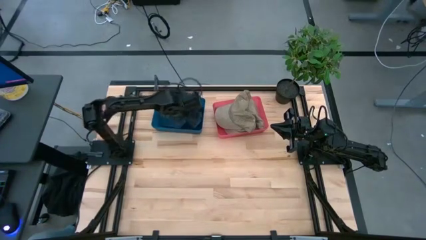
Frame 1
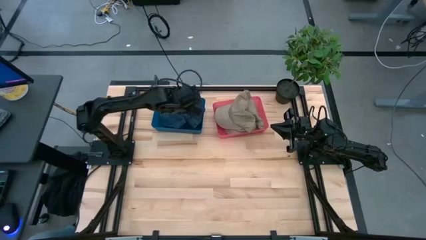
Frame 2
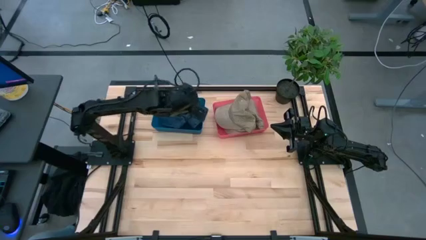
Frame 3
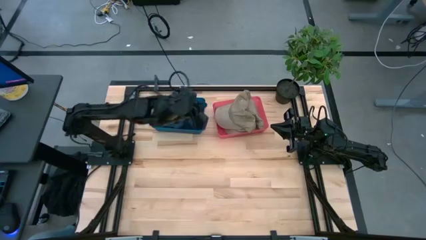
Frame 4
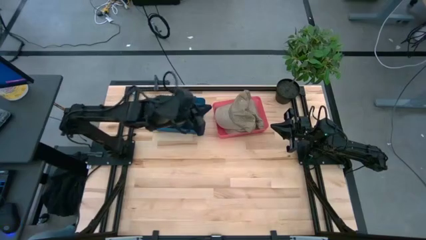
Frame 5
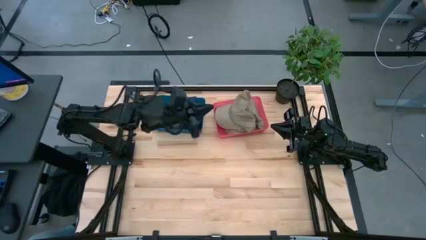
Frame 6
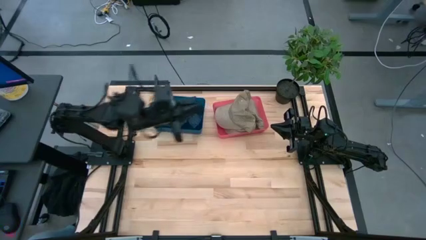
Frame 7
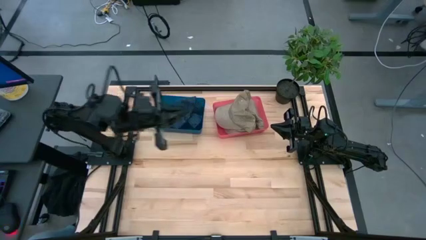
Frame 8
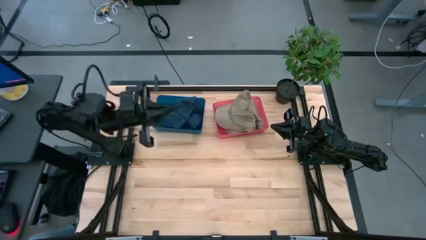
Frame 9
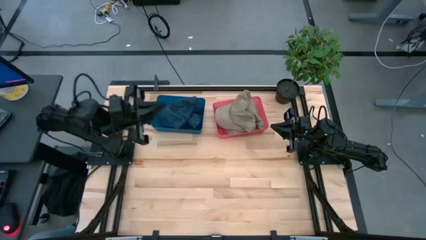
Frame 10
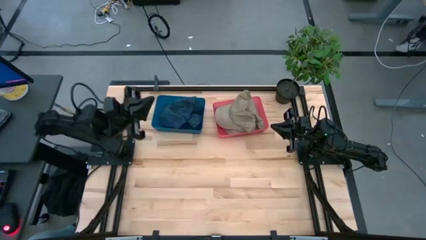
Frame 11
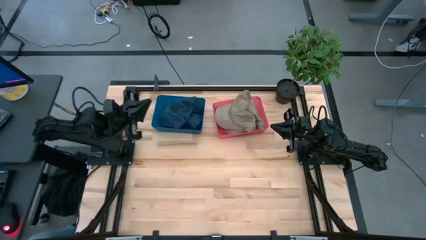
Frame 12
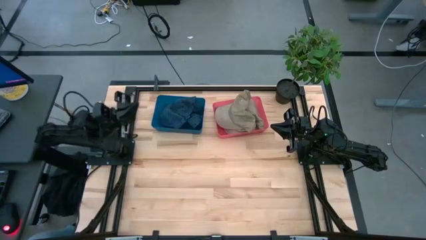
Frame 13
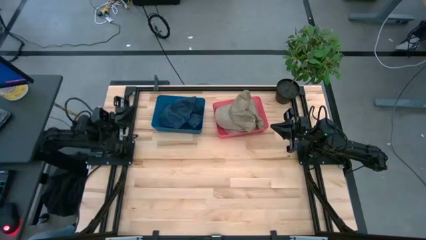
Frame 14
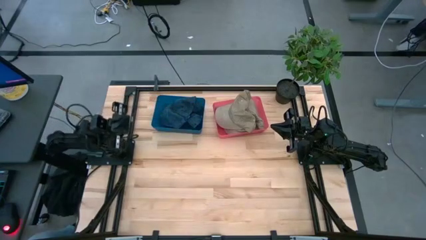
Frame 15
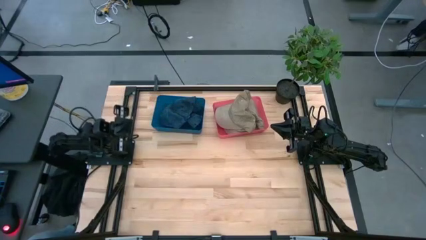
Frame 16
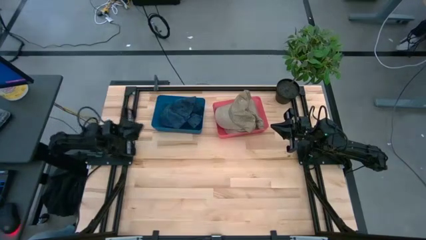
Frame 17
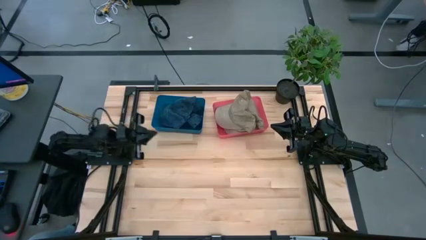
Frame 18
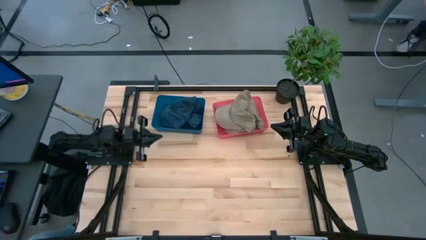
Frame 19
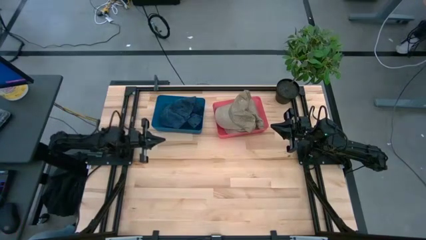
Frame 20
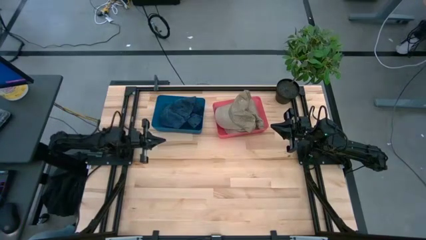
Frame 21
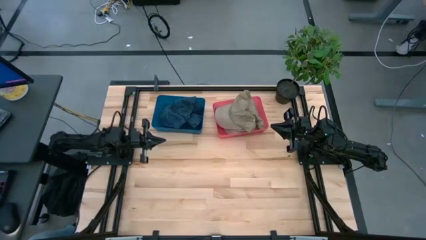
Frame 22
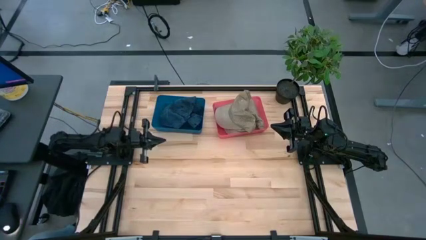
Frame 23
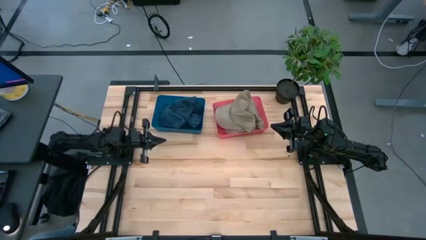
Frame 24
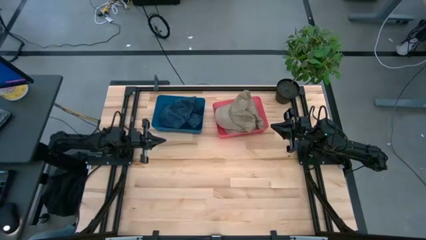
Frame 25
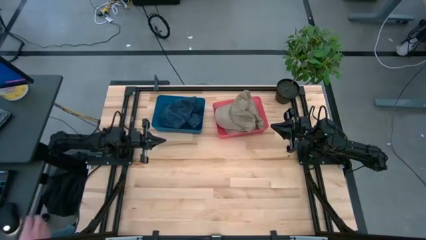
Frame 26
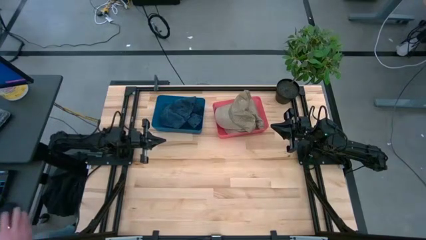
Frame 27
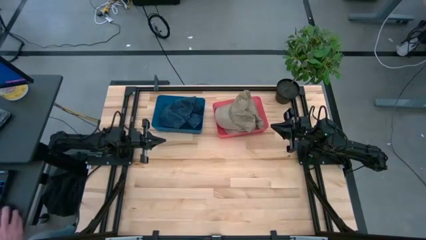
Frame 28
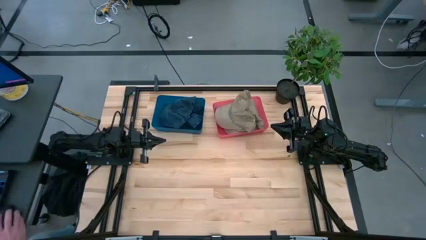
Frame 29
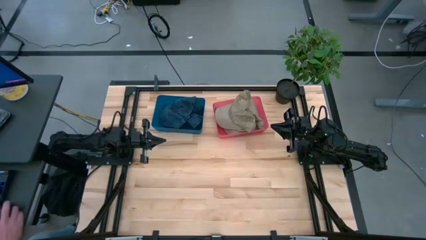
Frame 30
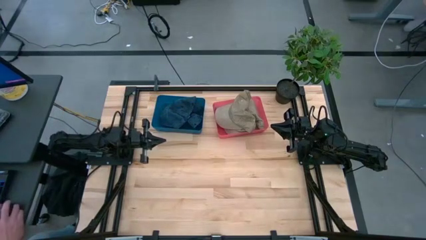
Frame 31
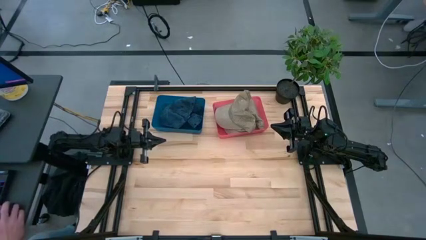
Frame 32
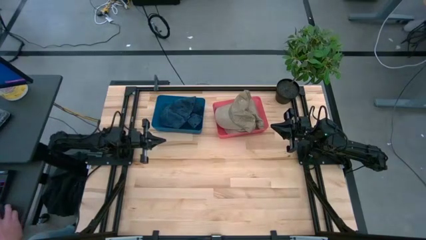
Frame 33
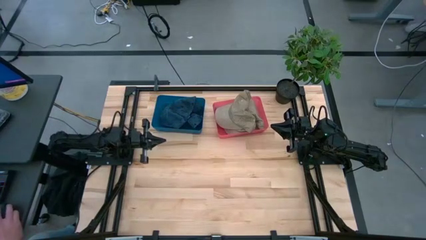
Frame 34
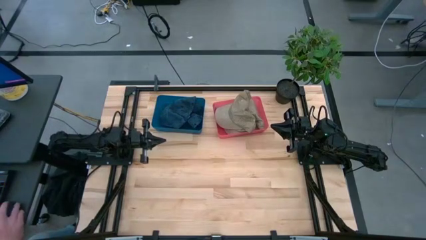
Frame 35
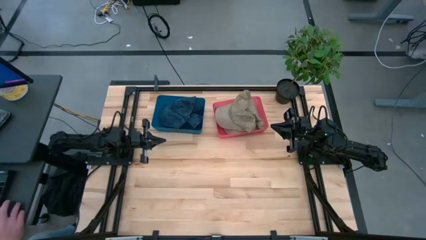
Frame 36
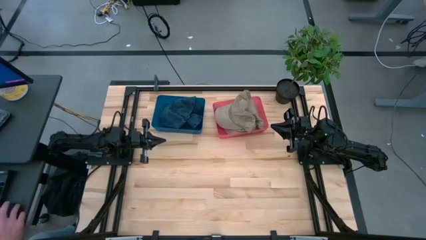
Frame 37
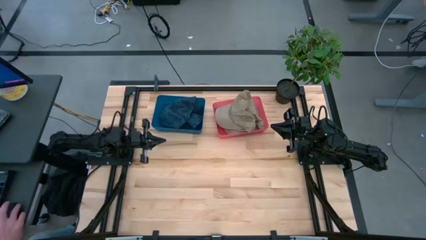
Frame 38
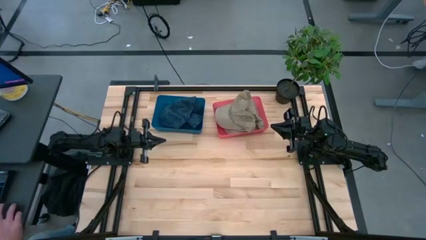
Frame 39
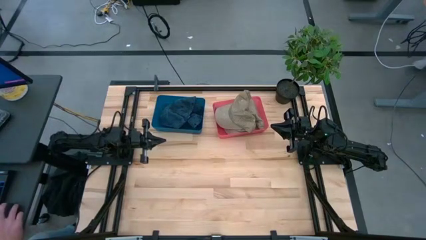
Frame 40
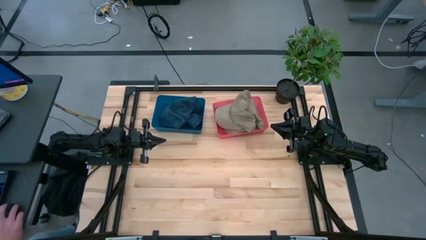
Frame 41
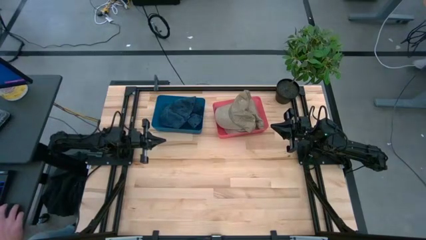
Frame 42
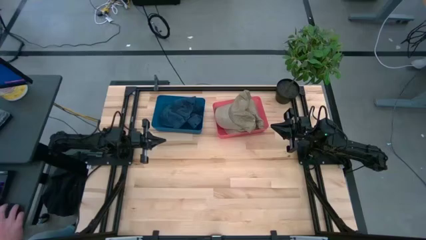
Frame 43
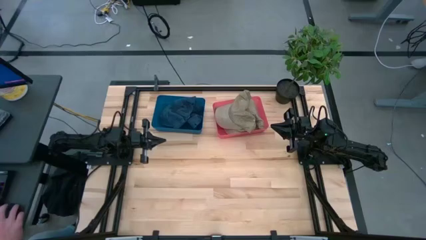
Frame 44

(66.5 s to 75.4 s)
Task: Pick & Place hat
Return to Home Position
